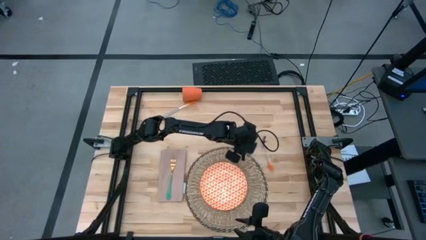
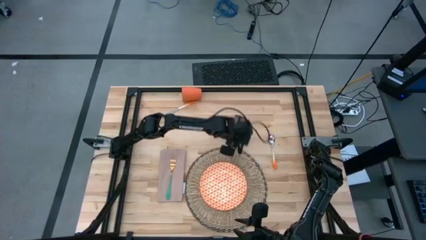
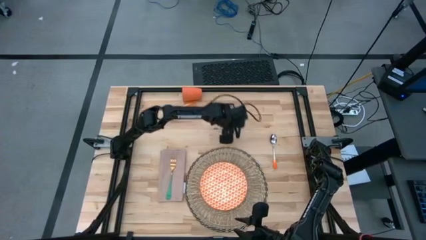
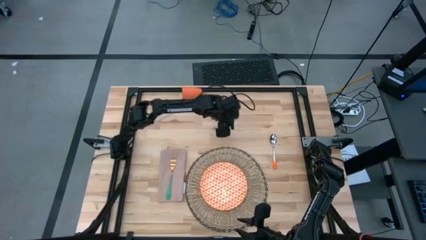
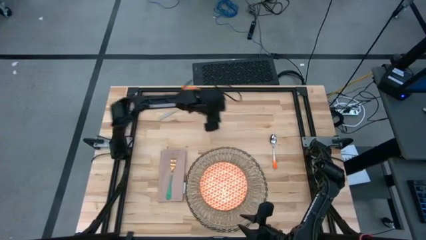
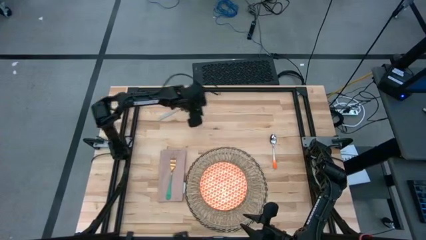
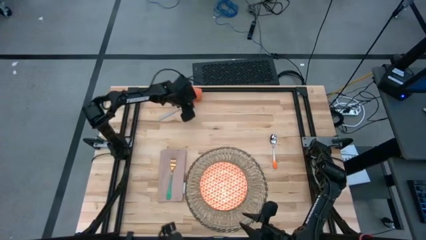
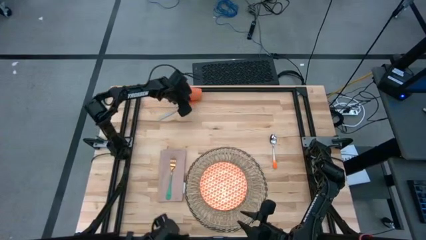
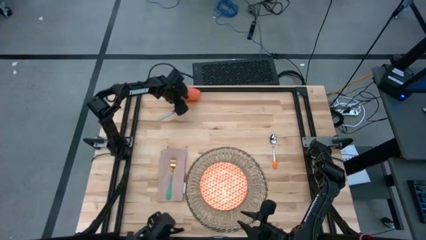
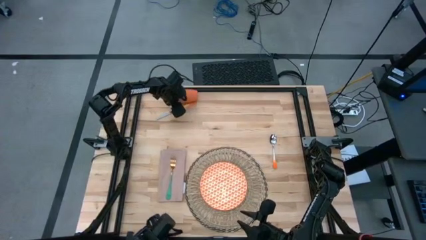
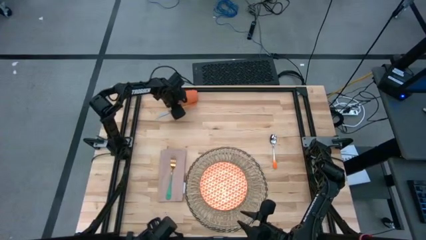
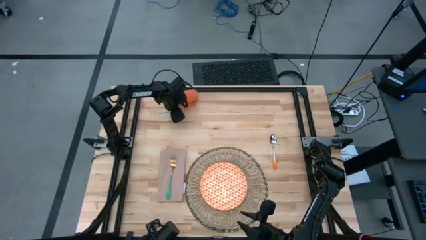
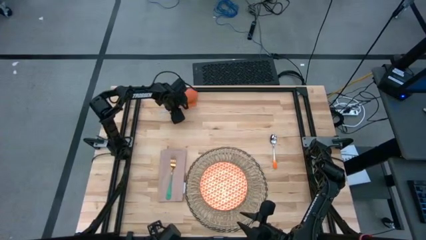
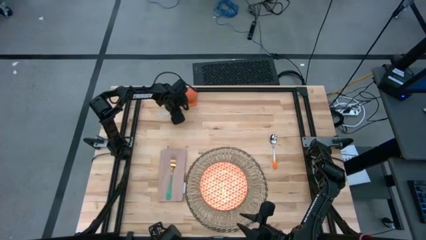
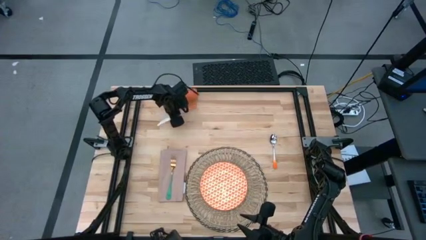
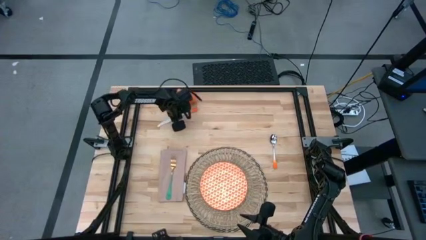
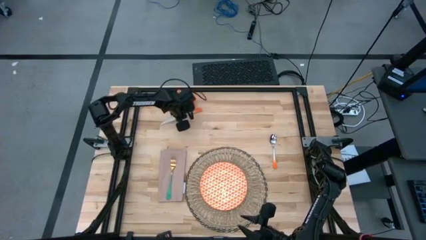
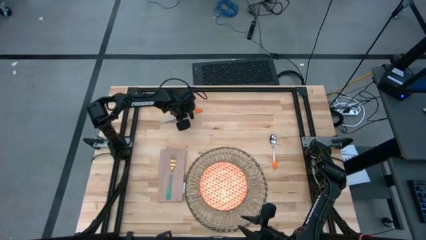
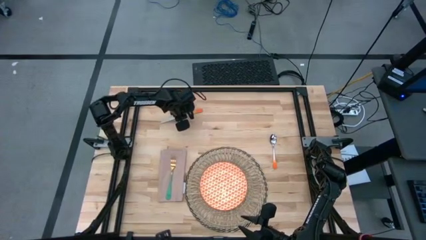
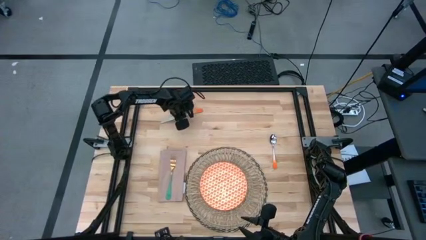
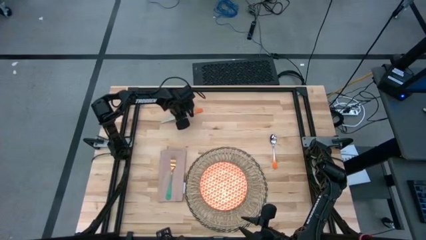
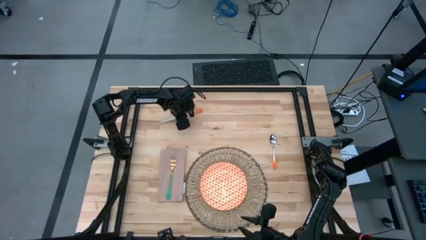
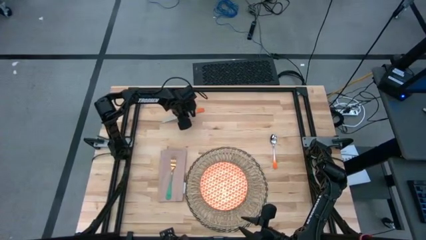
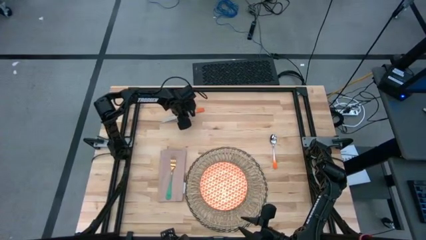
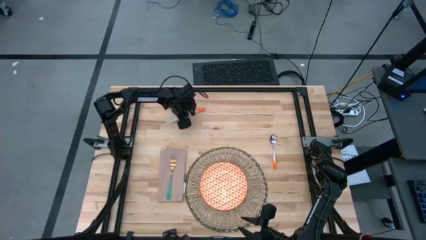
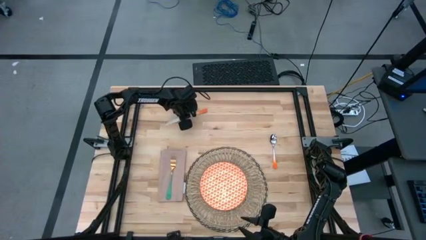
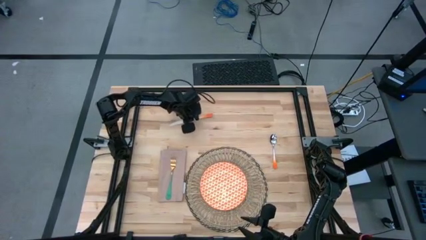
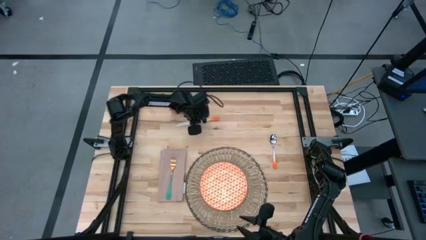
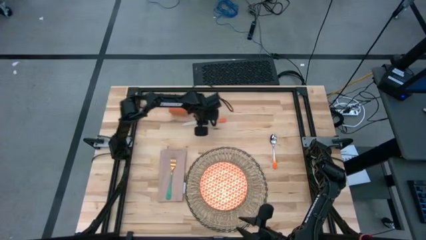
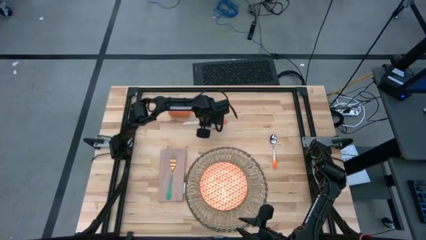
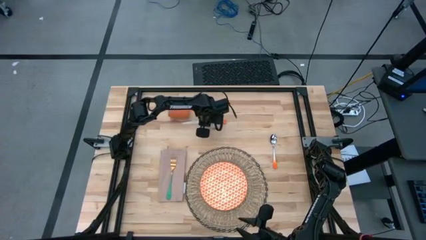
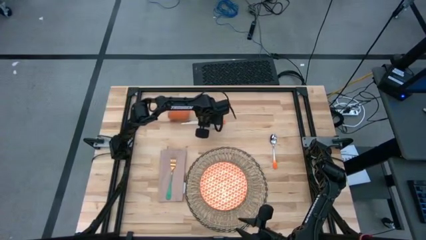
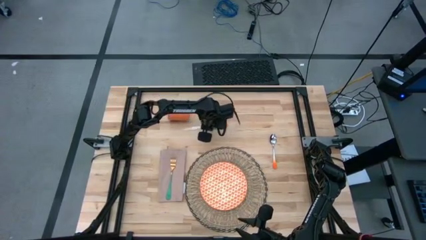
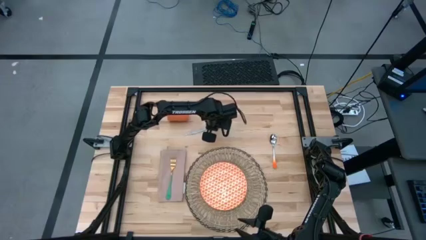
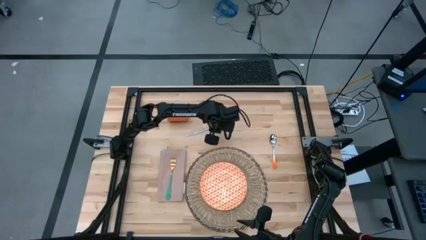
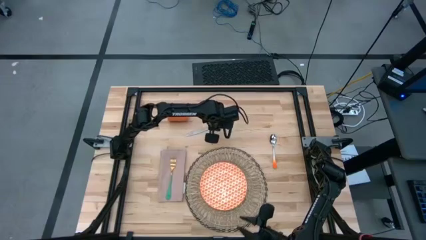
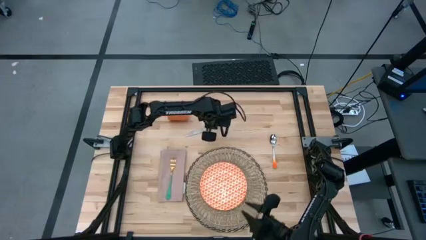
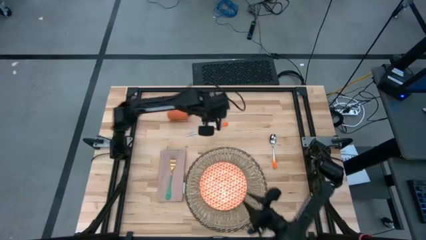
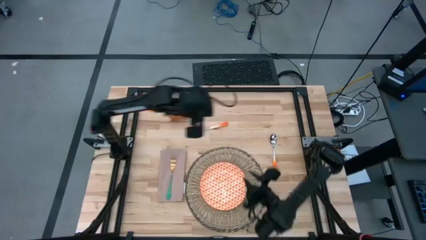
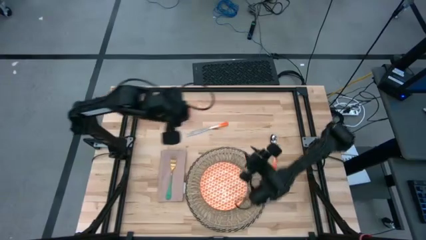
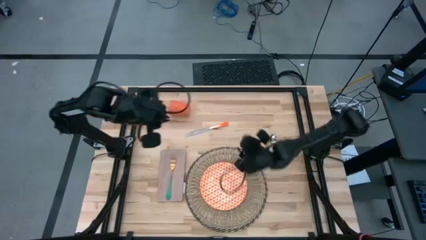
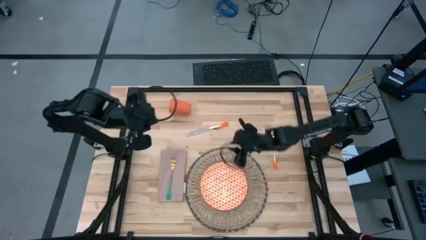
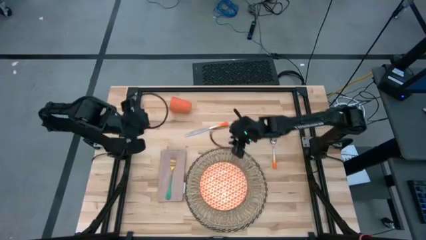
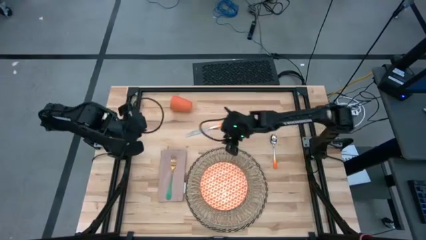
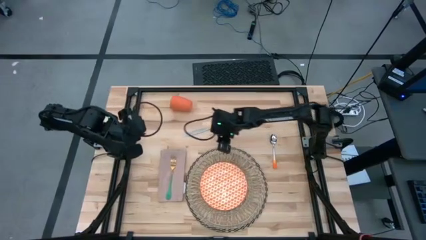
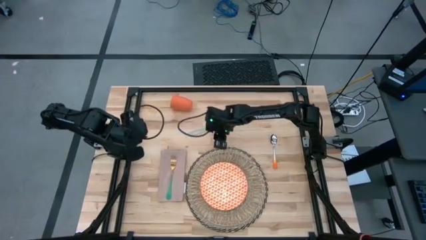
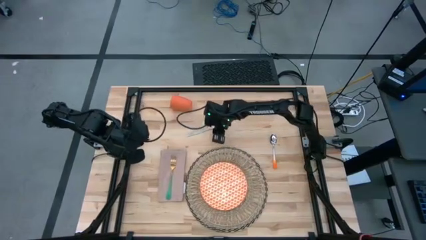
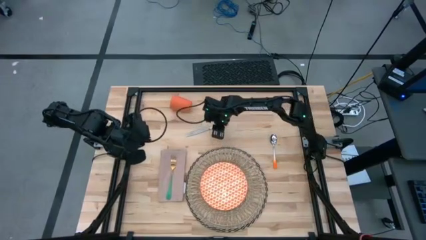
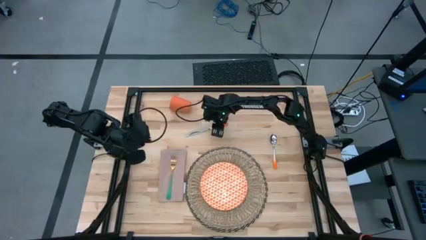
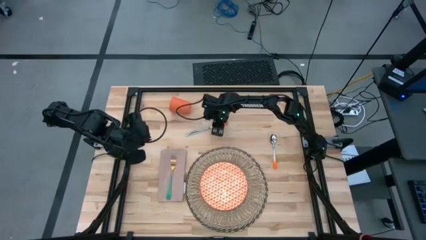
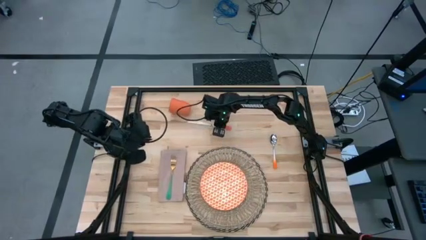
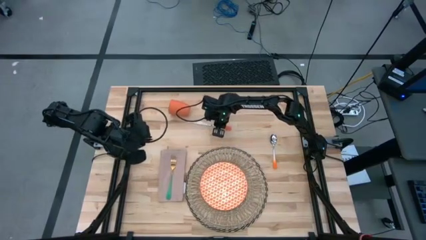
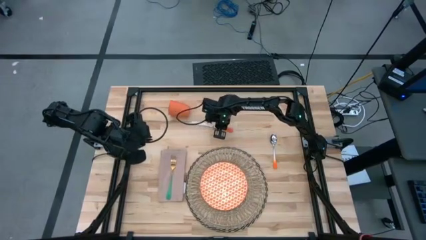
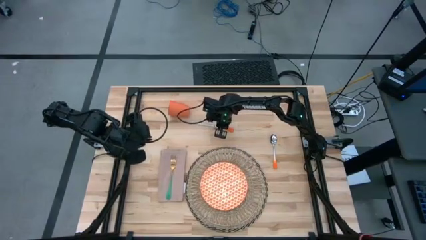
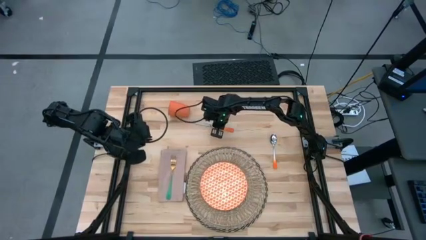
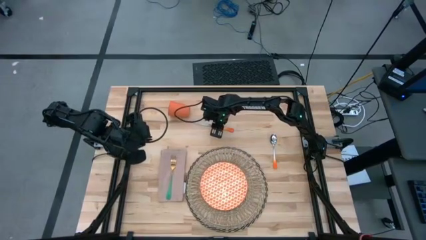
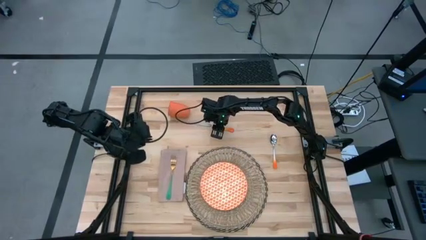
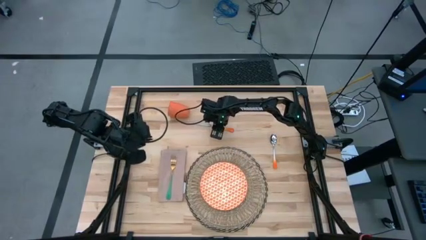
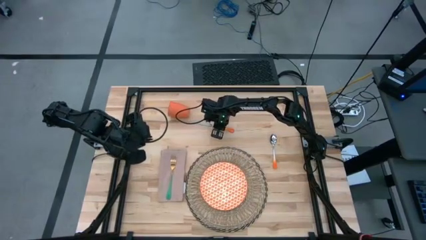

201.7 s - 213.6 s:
Task: Set table place
Put the knife on the table to the right of the mat

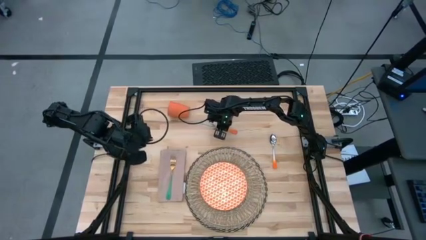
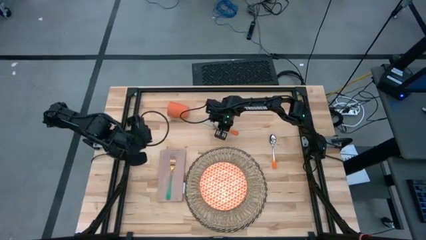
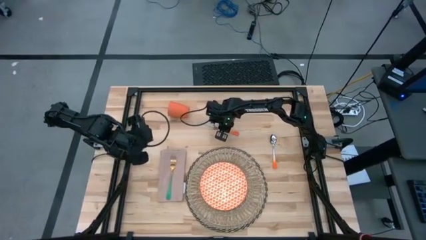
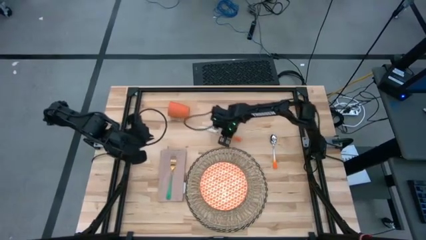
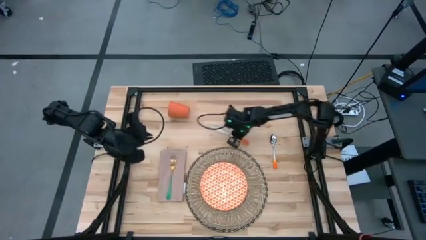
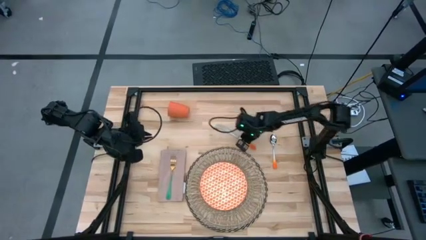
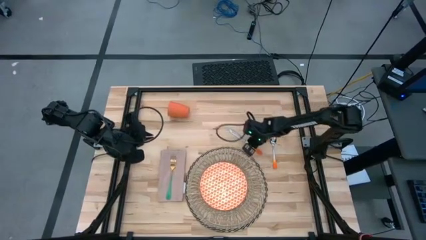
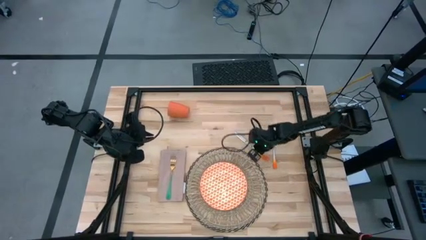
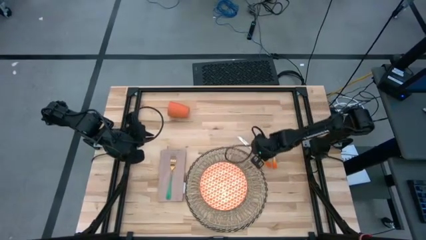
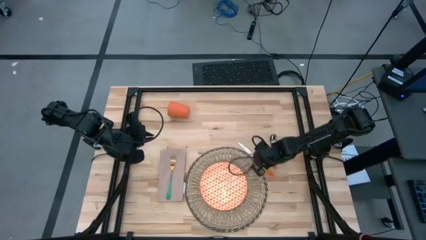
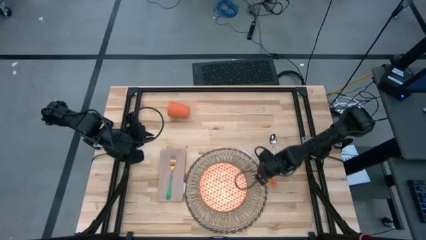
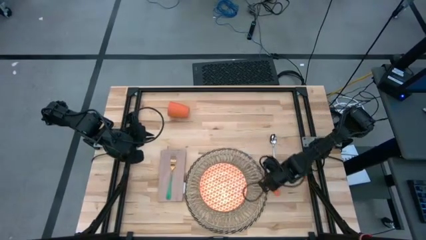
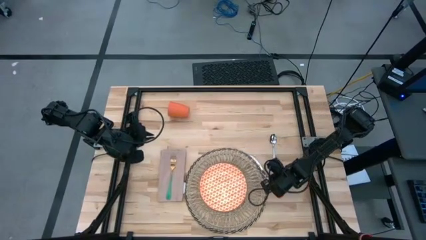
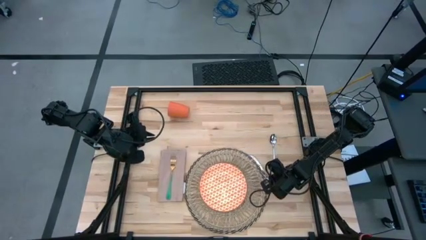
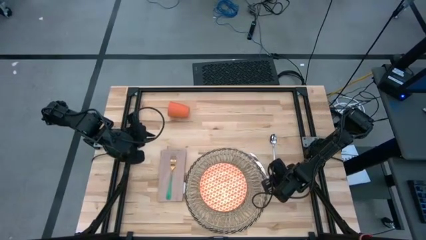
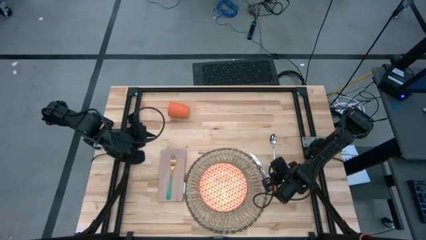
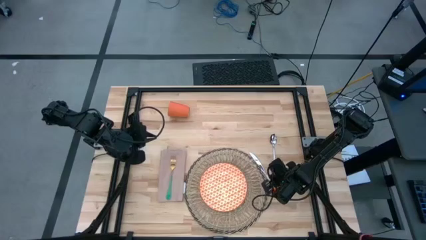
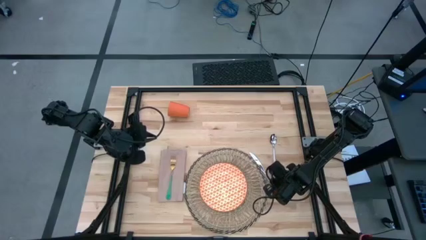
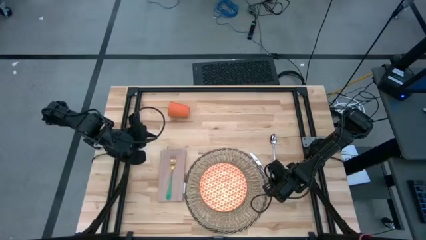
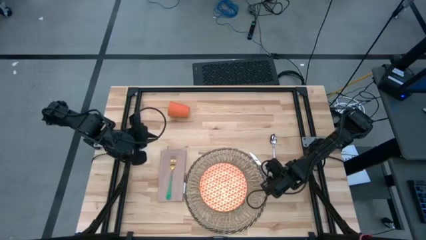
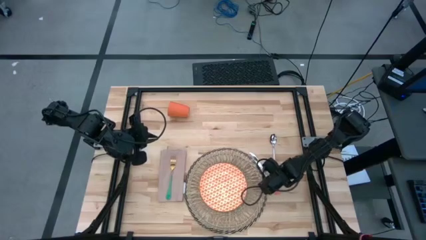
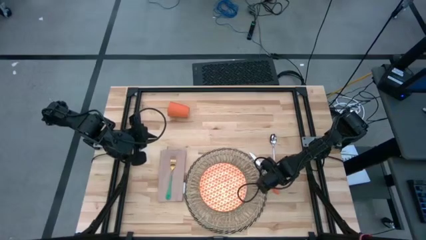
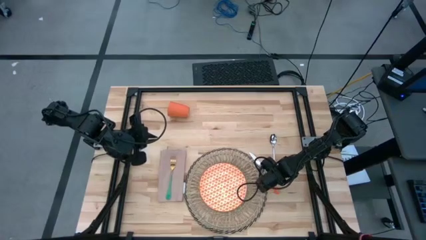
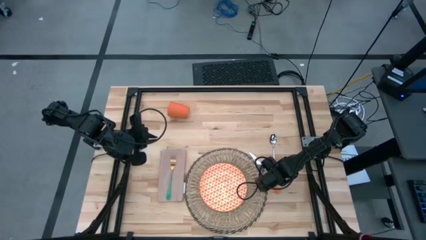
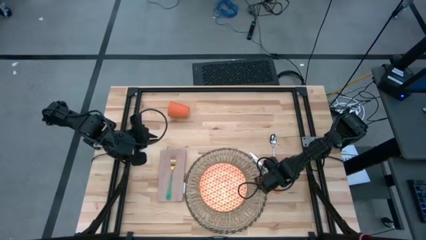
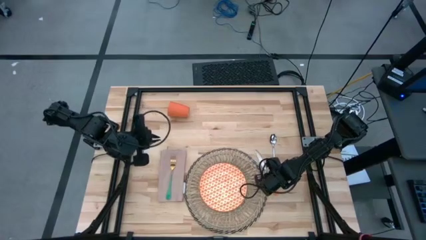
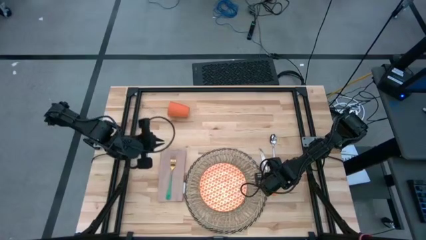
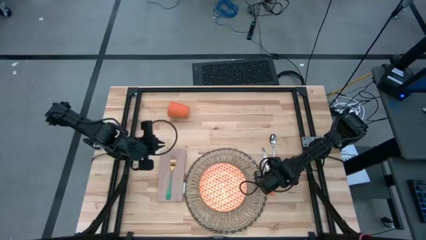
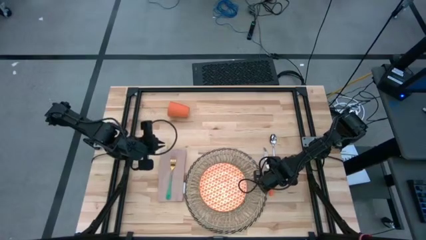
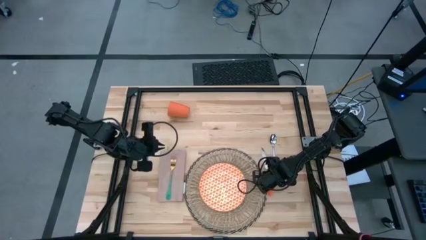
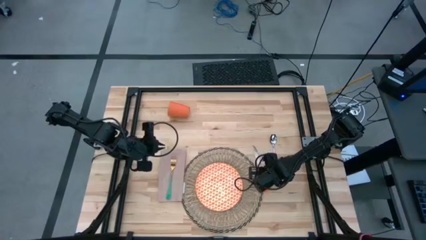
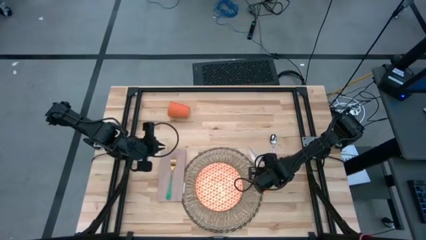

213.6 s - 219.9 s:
Put the knife on the table to the right of the mat
